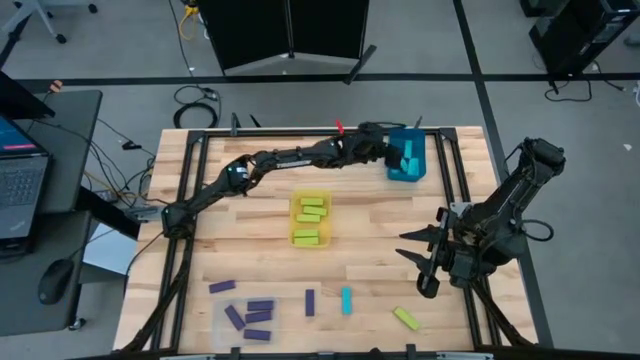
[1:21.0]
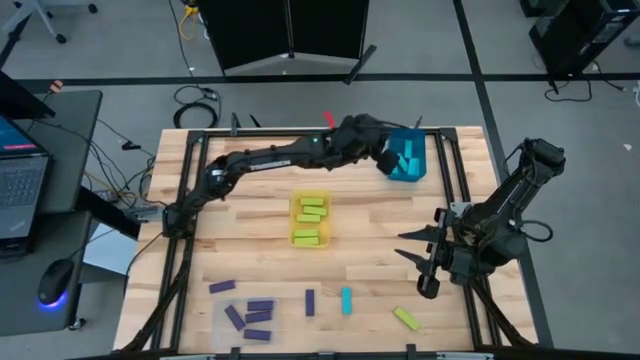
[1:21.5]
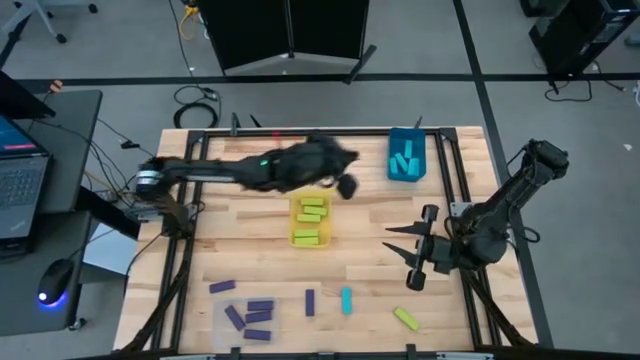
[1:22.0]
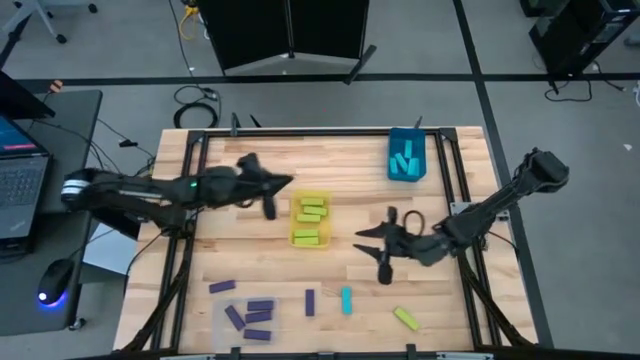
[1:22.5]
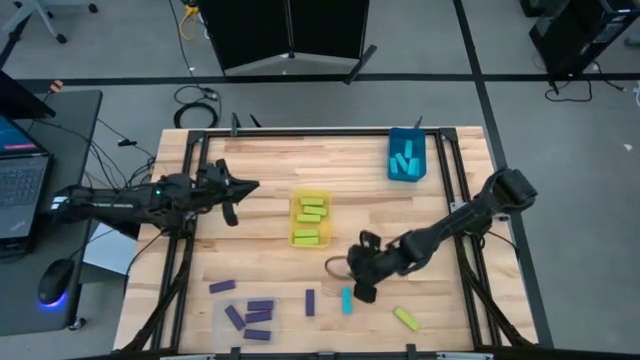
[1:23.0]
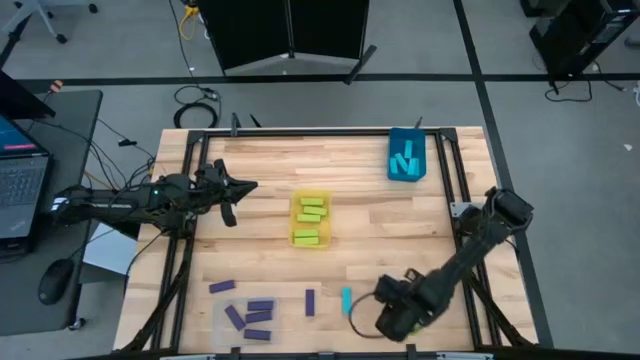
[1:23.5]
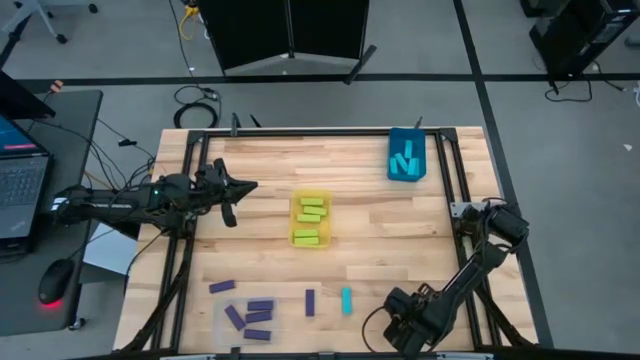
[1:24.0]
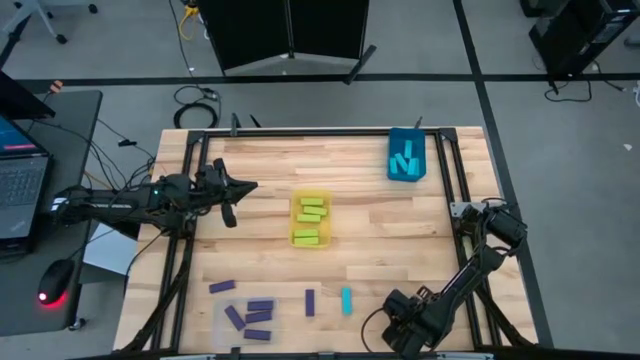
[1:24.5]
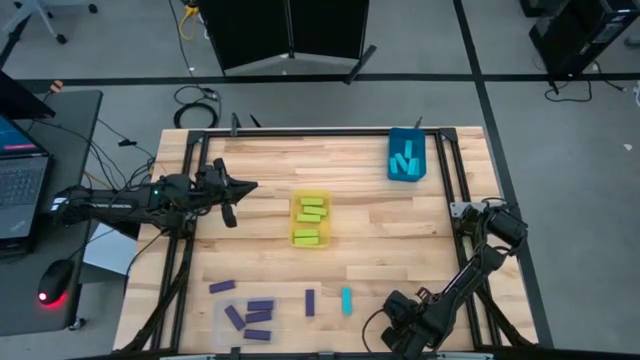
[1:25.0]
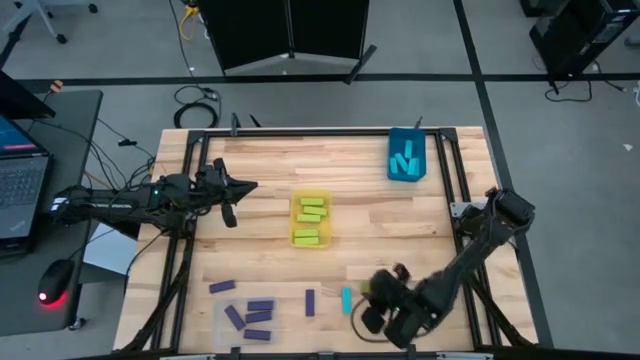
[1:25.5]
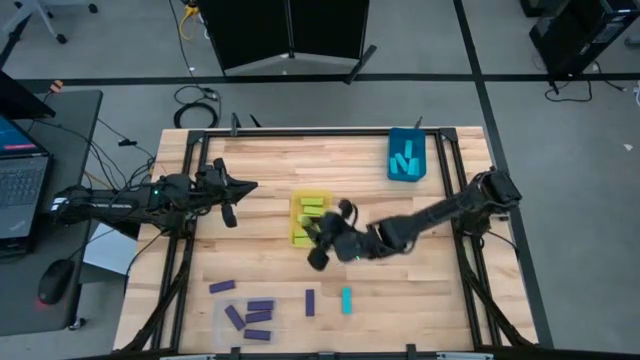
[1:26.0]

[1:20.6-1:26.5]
Task: Sort blocks
Put the light green block into the yellow bin

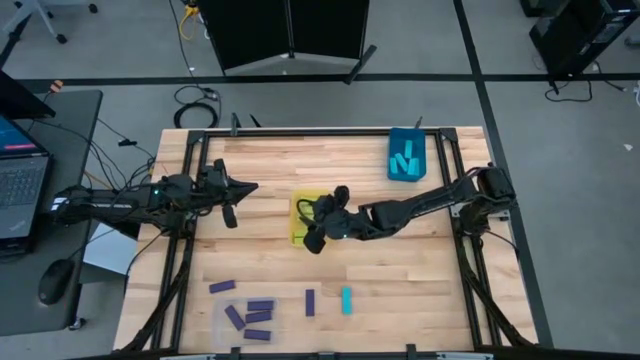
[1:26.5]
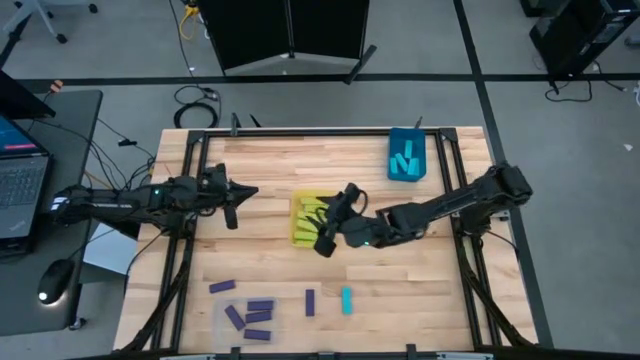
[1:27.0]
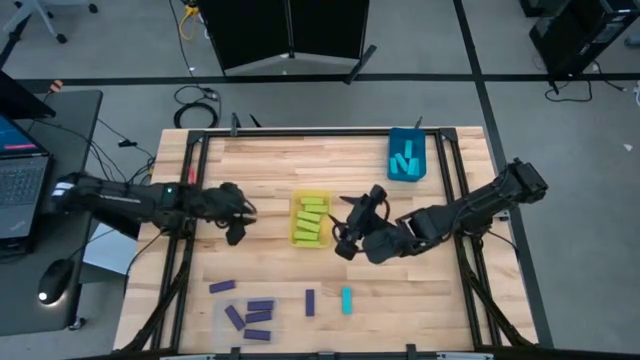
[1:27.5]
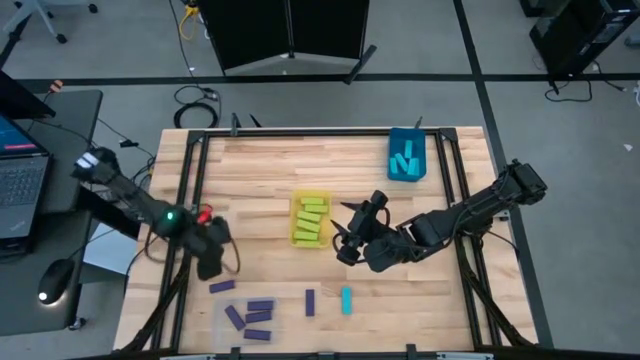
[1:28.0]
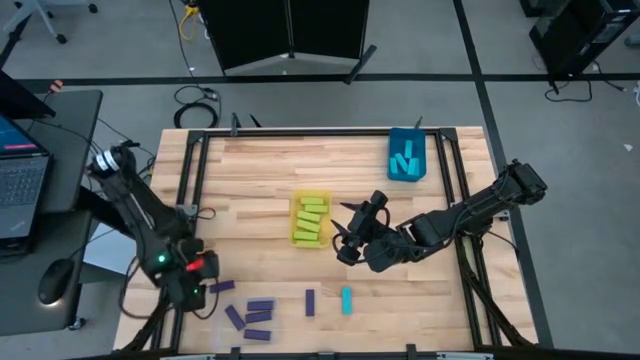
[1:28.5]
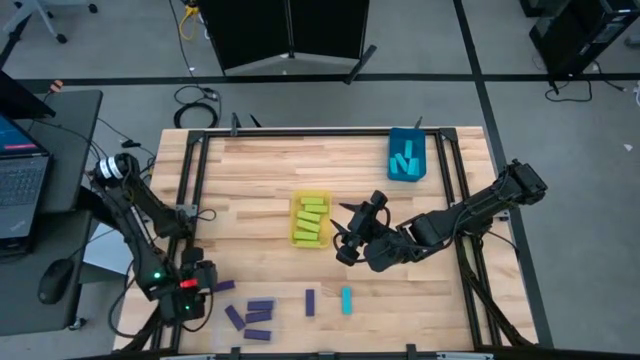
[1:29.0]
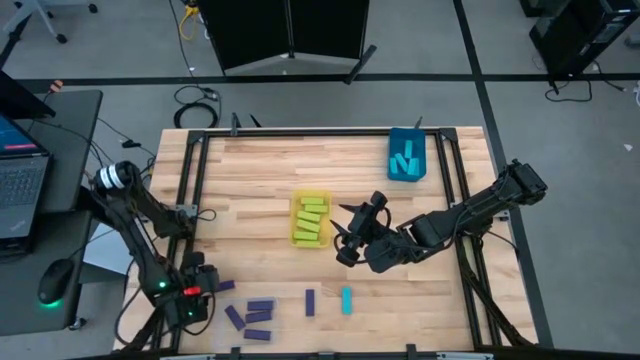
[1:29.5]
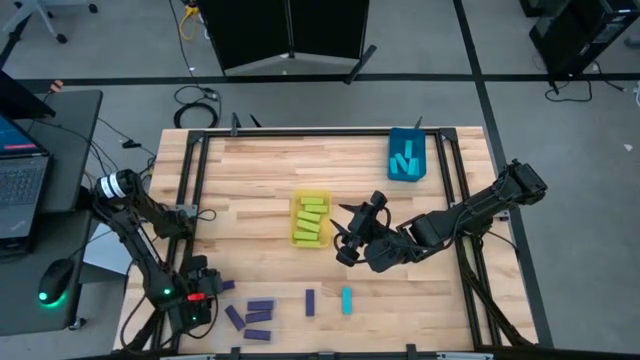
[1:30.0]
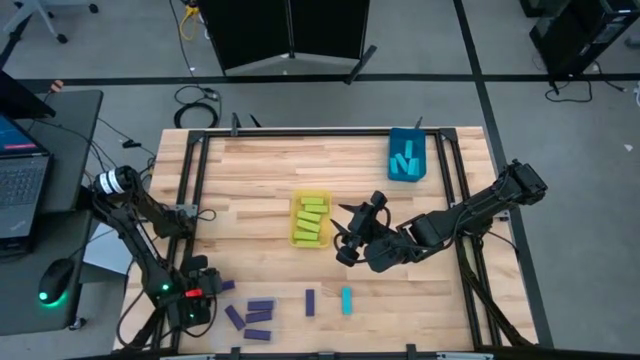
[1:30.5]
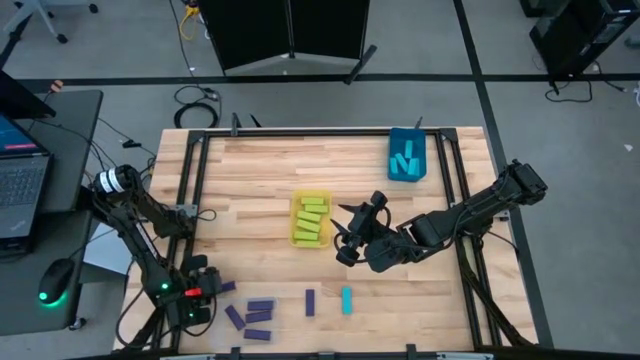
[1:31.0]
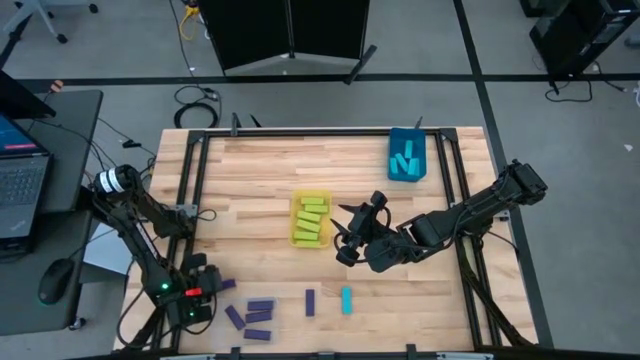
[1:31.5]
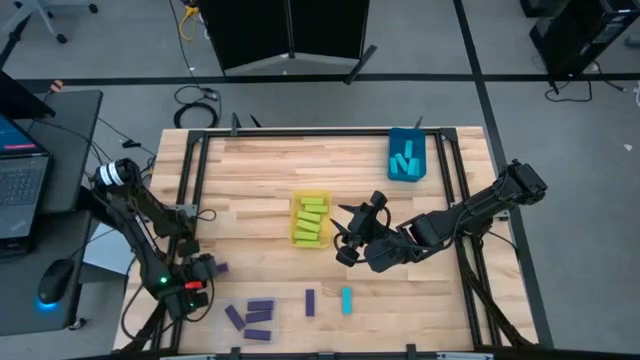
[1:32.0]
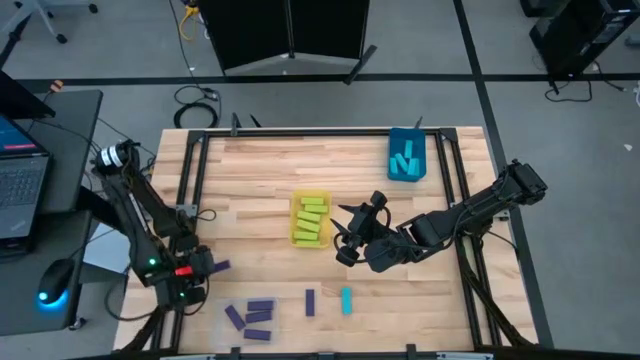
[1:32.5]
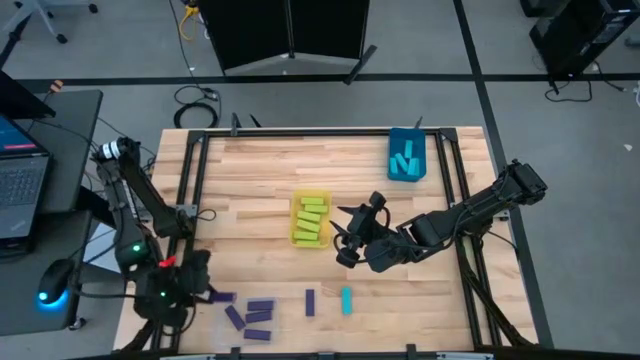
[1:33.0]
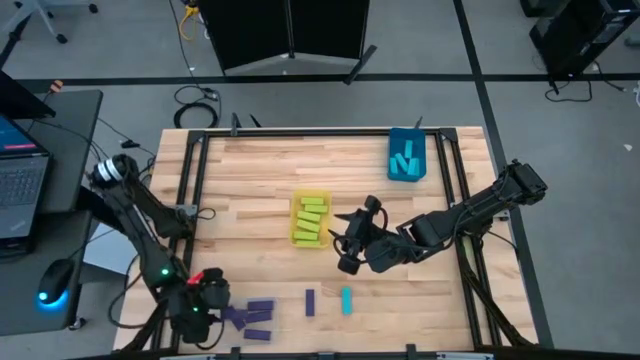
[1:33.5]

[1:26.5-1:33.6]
Put the purple block into the transparent bin

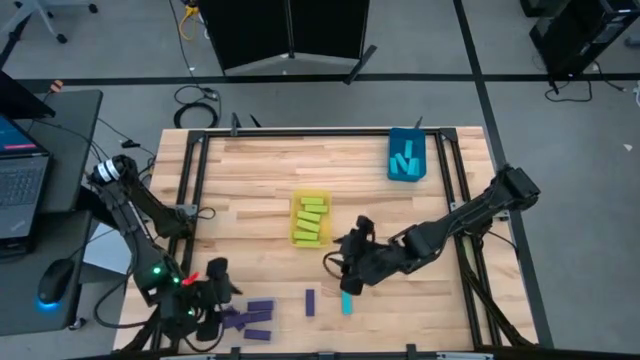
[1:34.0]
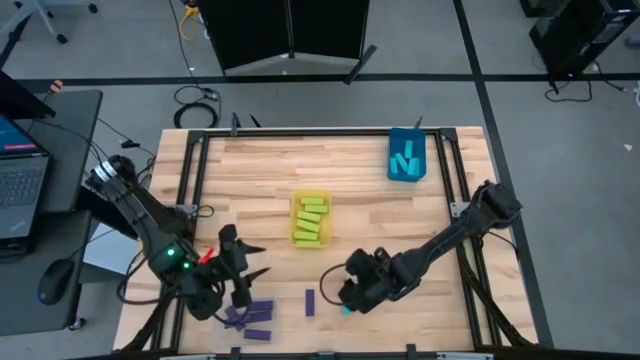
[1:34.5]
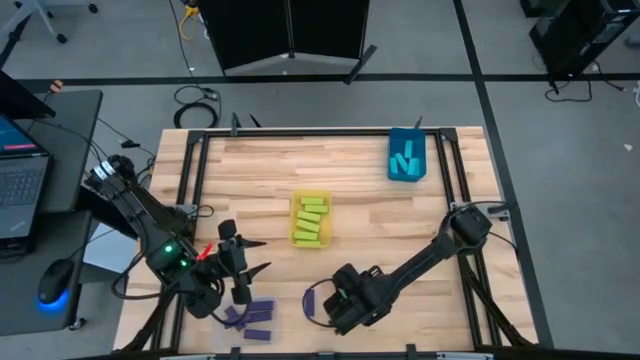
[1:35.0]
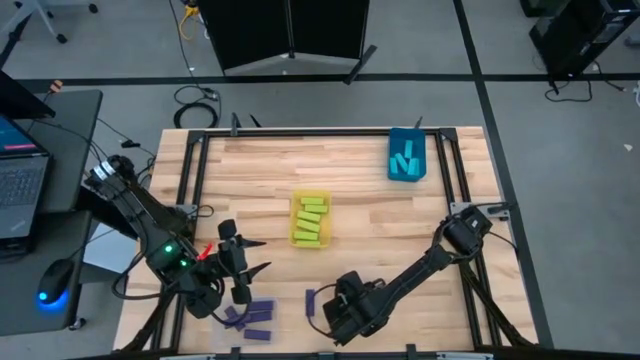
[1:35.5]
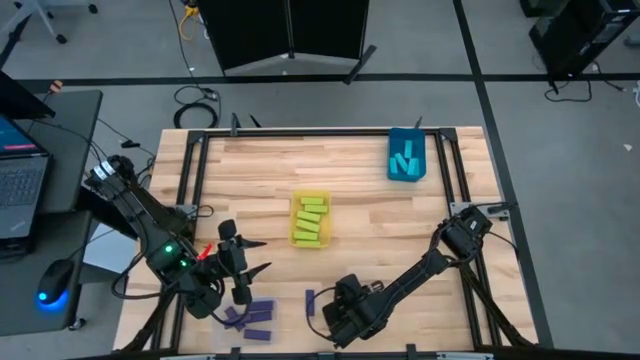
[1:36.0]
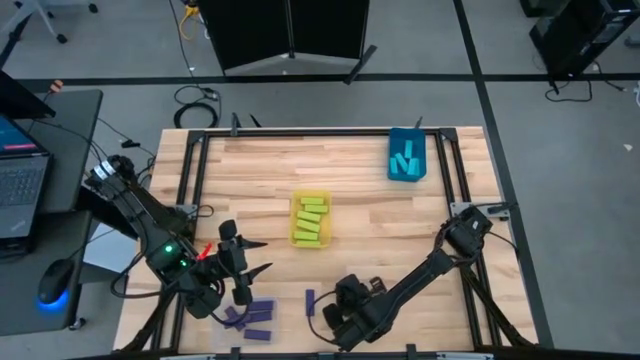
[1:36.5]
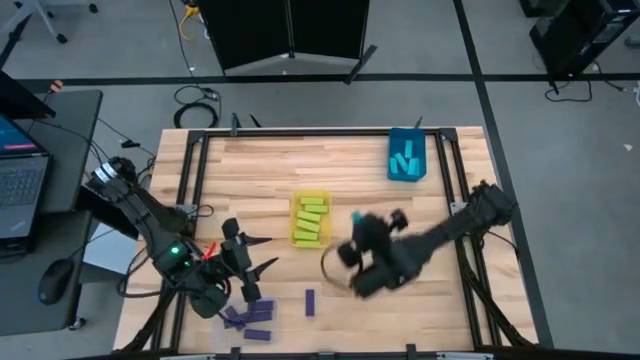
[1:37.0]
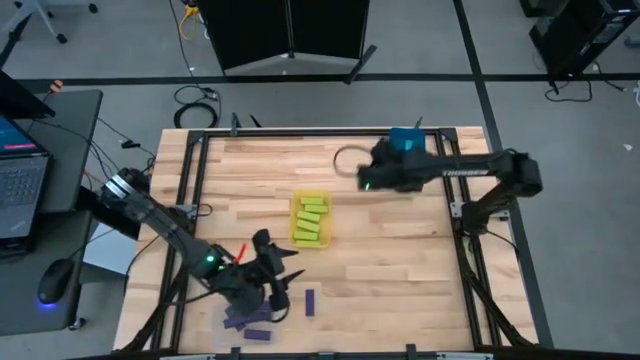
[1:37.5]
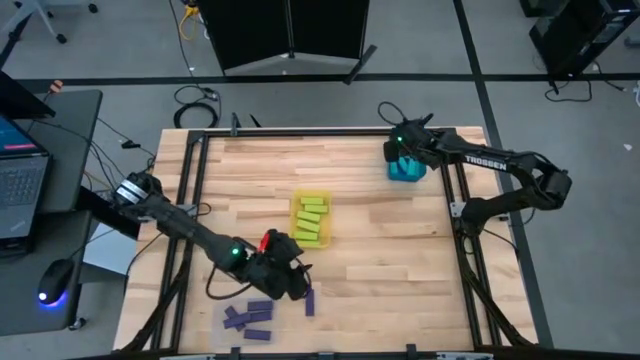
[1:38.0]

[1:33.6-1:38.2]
Put the light blue block into the blue bin

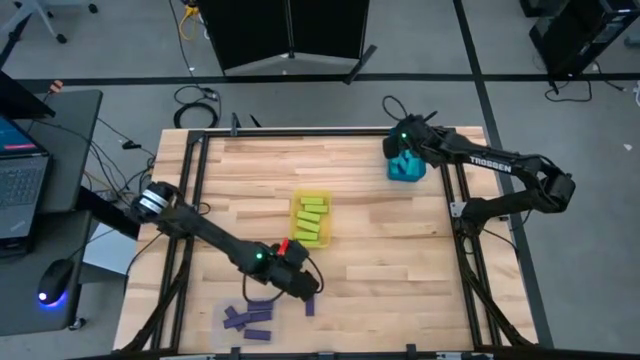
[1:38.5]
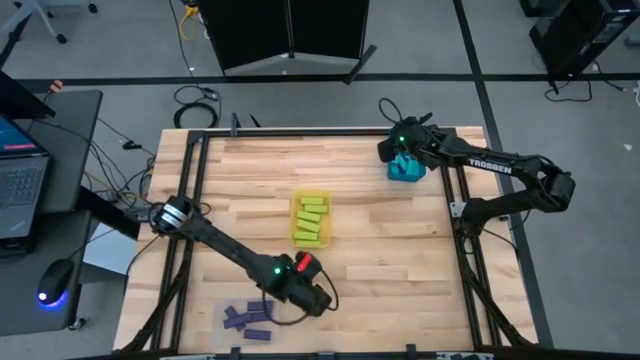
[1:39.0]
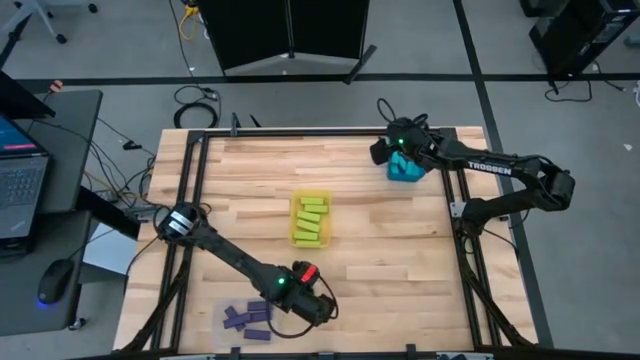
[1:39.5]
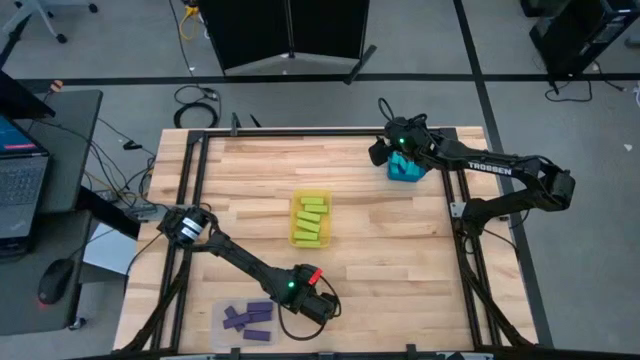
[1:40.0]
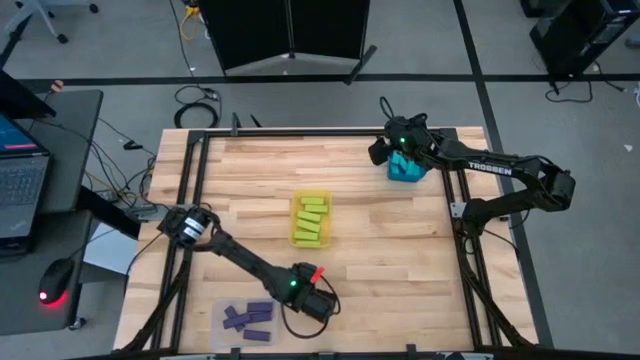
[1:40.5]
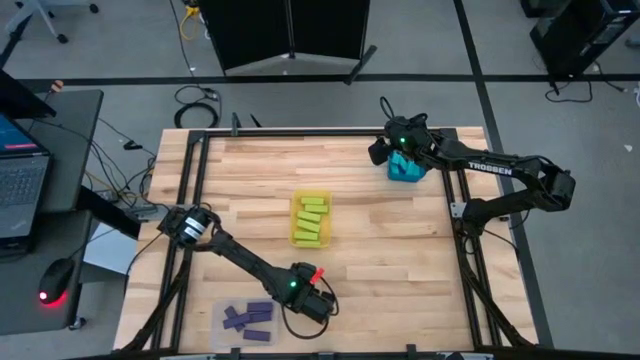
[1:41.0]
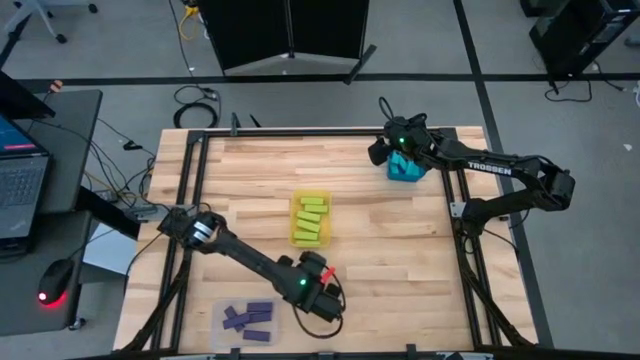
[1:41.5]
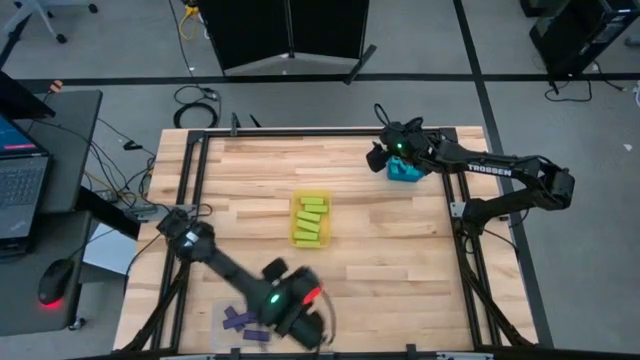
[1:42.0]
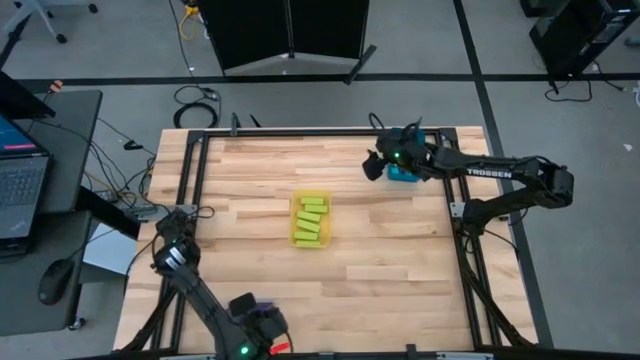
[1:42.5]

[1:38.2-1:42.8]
Put the purple block into the transparent bin
